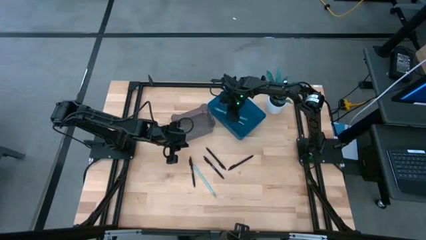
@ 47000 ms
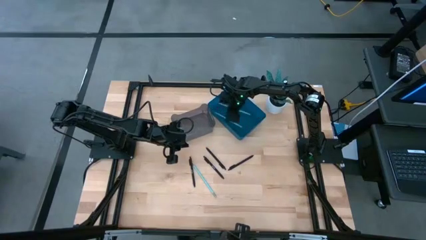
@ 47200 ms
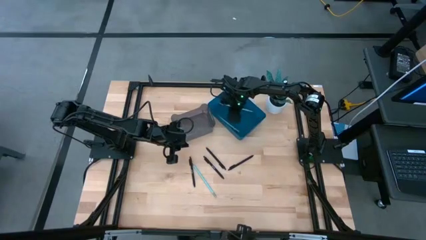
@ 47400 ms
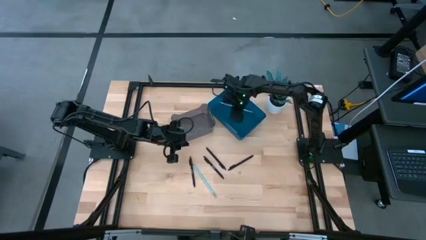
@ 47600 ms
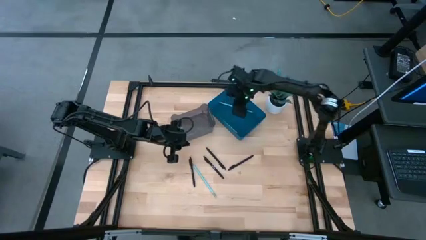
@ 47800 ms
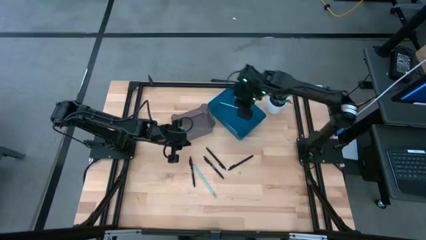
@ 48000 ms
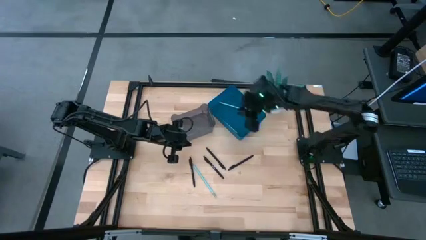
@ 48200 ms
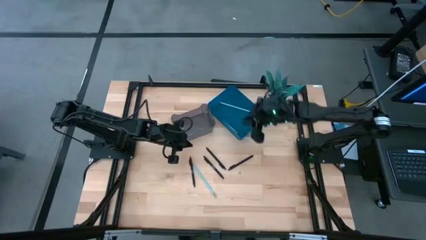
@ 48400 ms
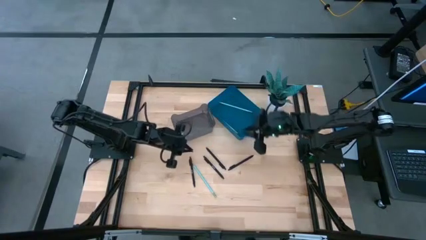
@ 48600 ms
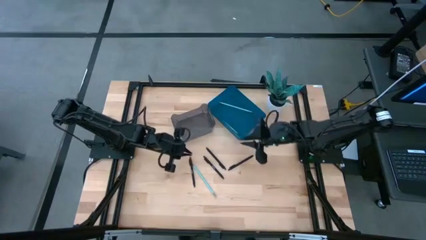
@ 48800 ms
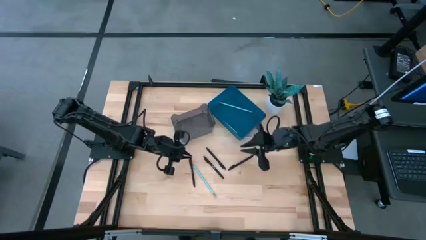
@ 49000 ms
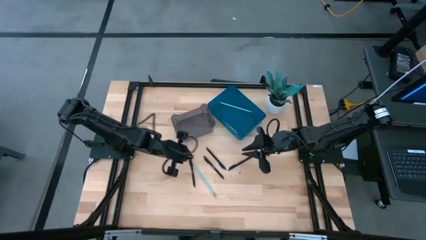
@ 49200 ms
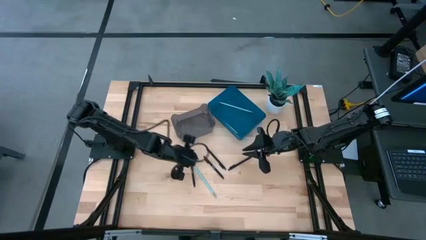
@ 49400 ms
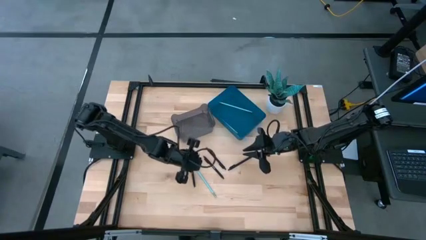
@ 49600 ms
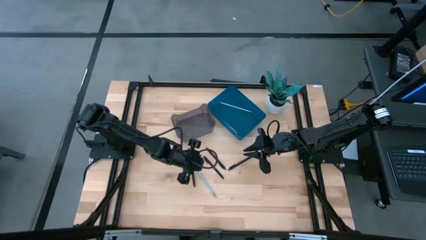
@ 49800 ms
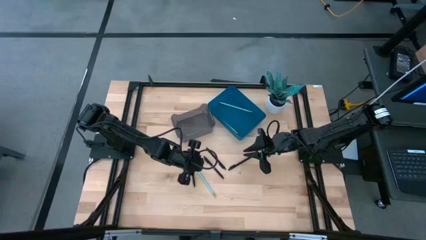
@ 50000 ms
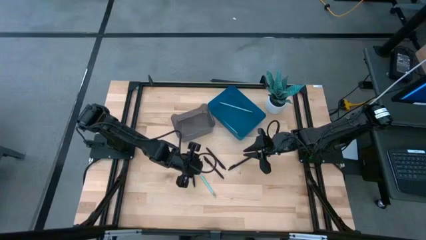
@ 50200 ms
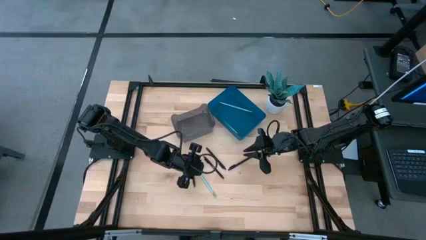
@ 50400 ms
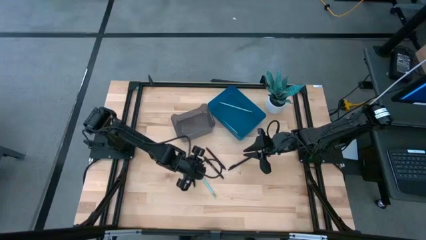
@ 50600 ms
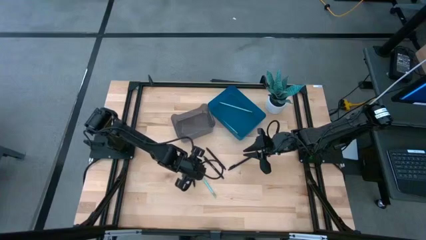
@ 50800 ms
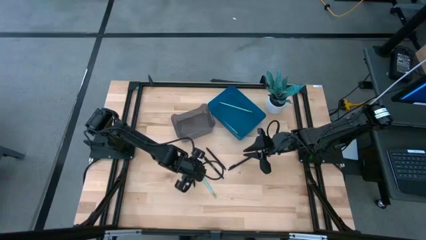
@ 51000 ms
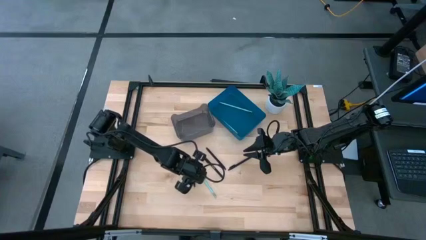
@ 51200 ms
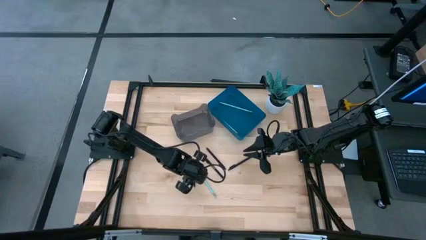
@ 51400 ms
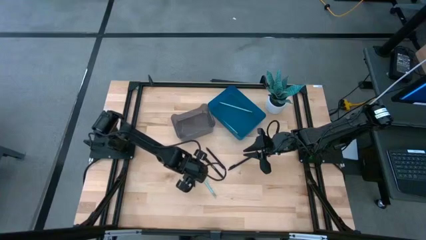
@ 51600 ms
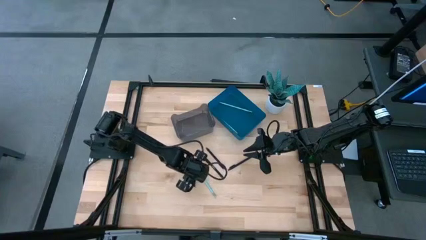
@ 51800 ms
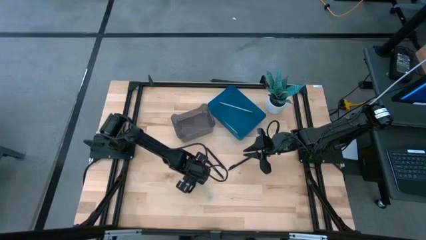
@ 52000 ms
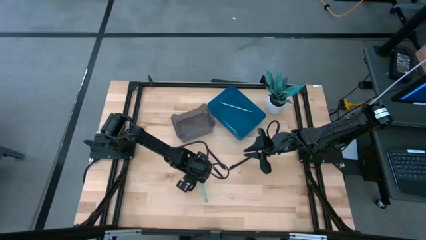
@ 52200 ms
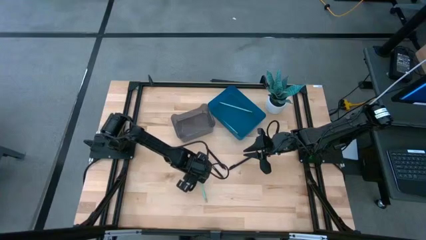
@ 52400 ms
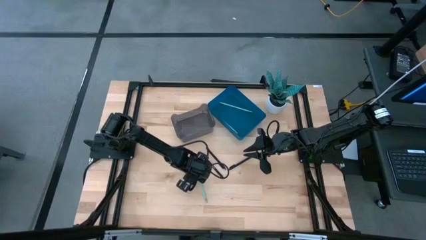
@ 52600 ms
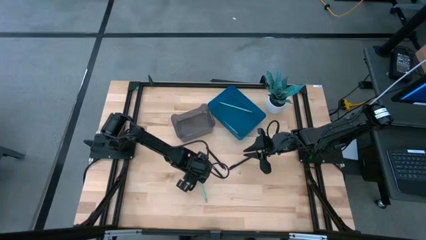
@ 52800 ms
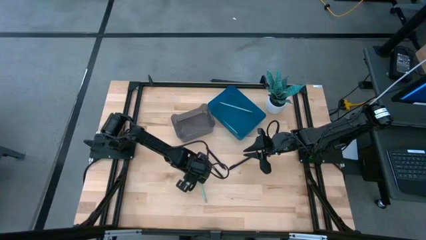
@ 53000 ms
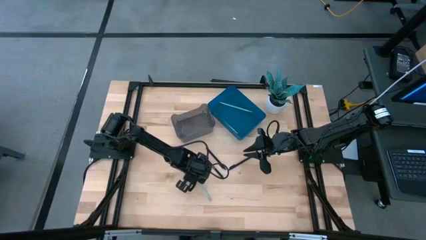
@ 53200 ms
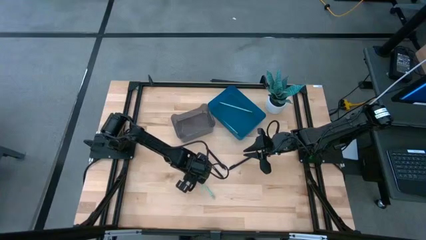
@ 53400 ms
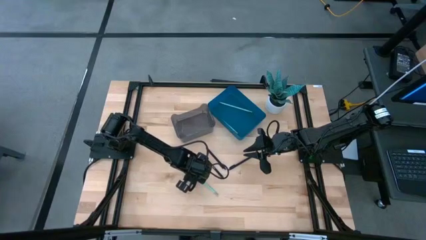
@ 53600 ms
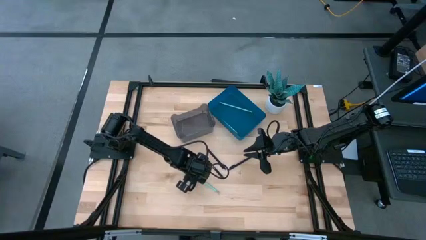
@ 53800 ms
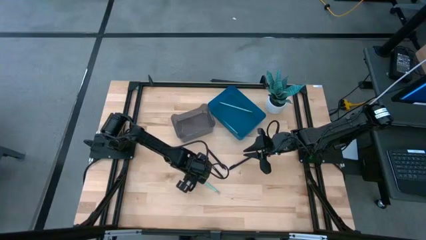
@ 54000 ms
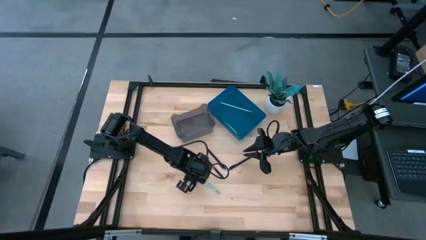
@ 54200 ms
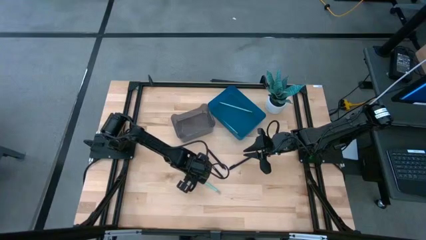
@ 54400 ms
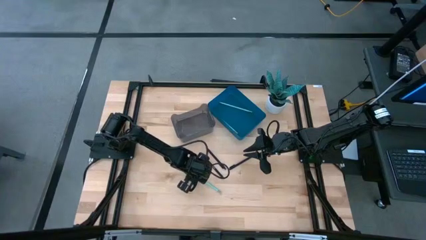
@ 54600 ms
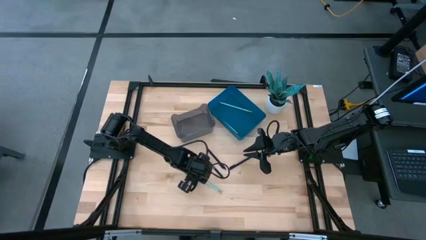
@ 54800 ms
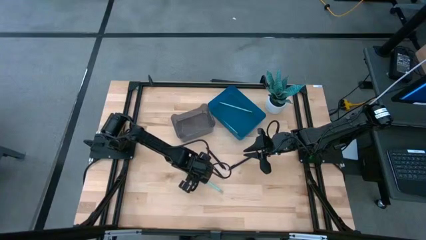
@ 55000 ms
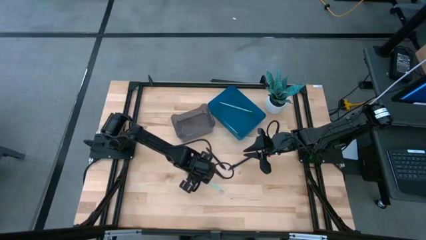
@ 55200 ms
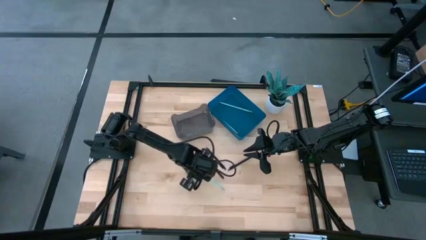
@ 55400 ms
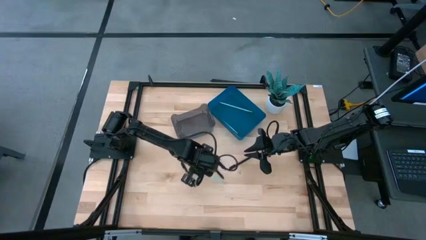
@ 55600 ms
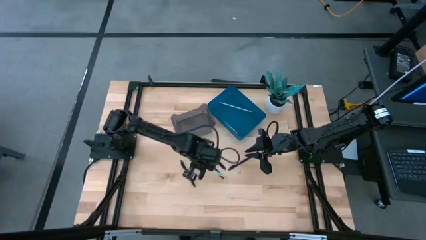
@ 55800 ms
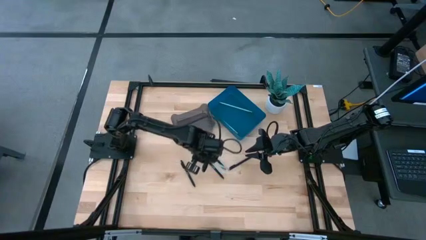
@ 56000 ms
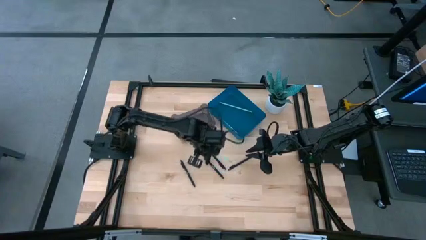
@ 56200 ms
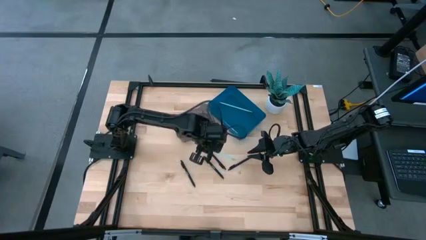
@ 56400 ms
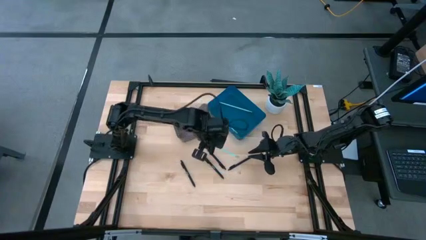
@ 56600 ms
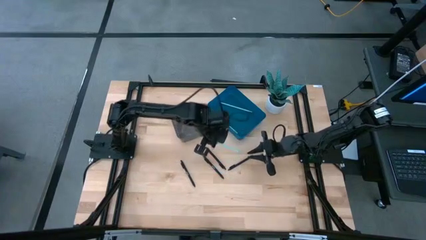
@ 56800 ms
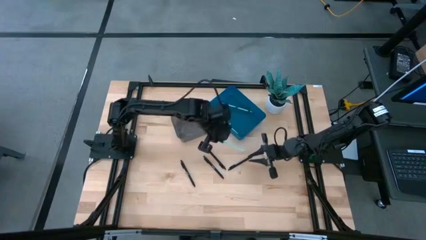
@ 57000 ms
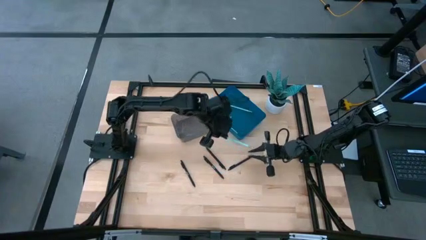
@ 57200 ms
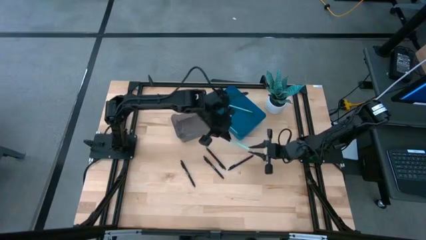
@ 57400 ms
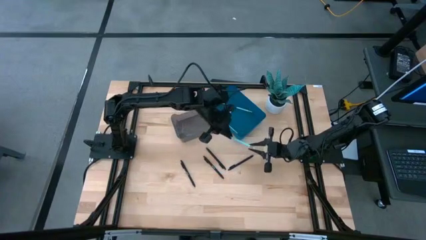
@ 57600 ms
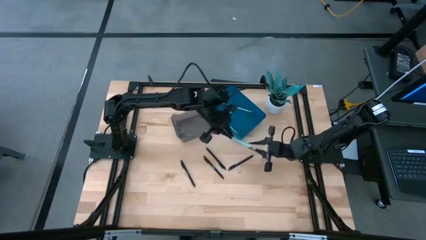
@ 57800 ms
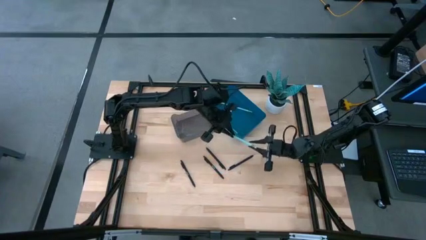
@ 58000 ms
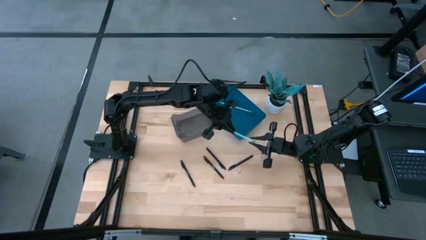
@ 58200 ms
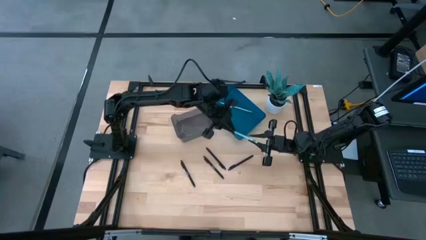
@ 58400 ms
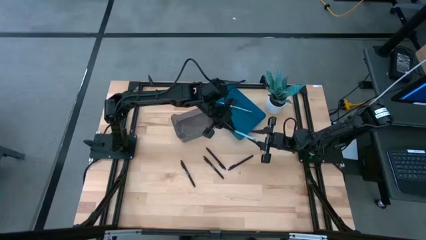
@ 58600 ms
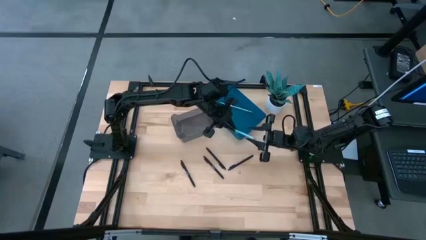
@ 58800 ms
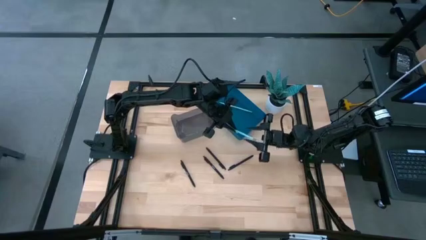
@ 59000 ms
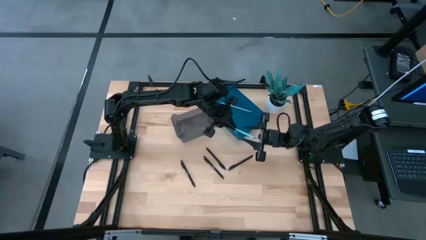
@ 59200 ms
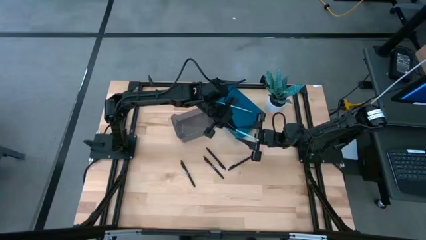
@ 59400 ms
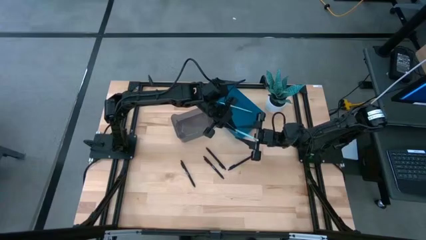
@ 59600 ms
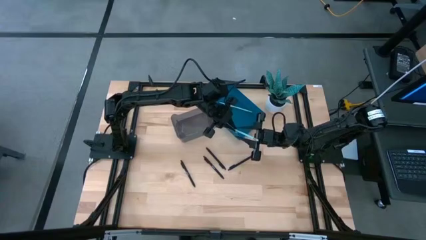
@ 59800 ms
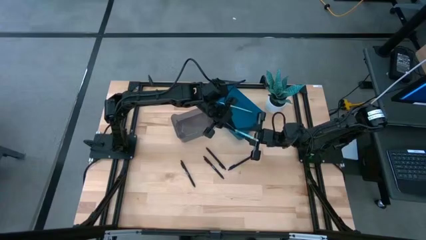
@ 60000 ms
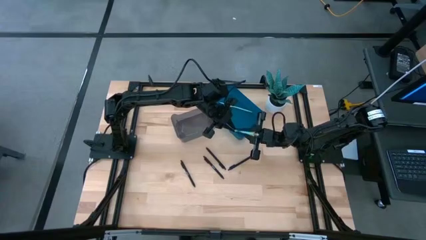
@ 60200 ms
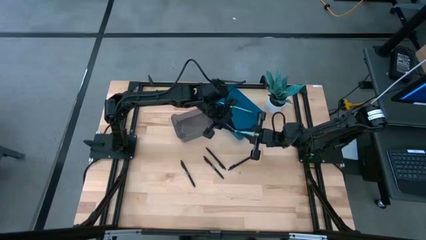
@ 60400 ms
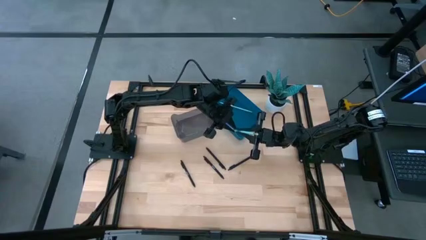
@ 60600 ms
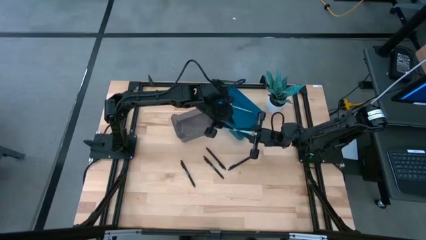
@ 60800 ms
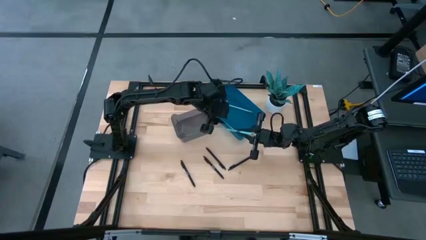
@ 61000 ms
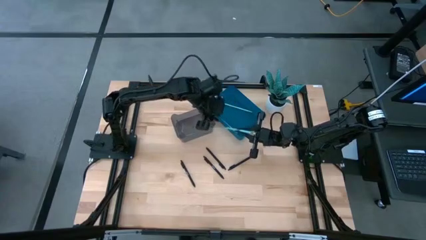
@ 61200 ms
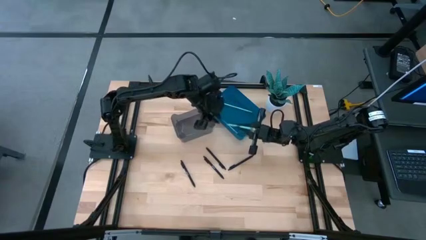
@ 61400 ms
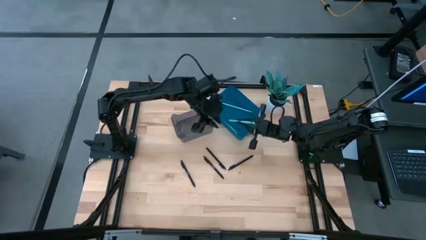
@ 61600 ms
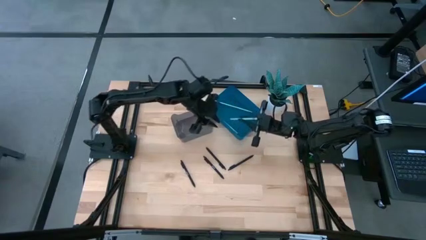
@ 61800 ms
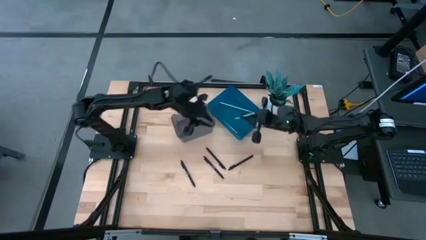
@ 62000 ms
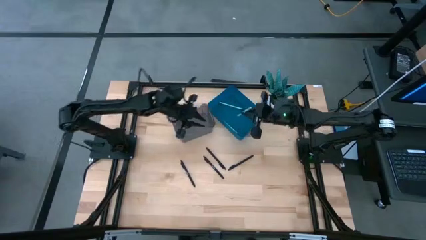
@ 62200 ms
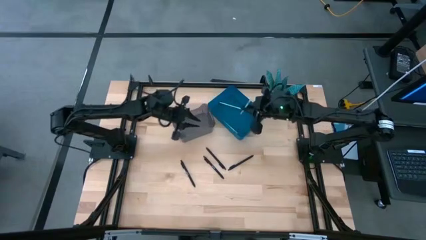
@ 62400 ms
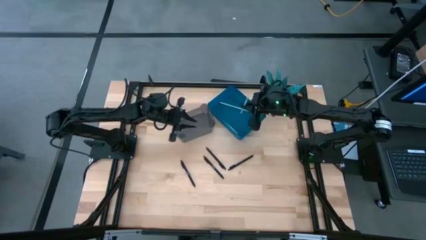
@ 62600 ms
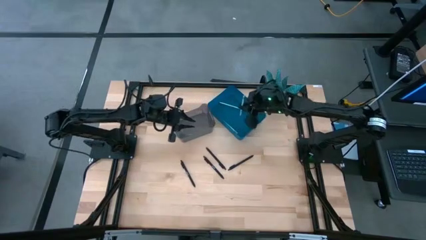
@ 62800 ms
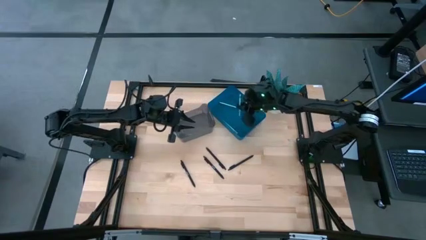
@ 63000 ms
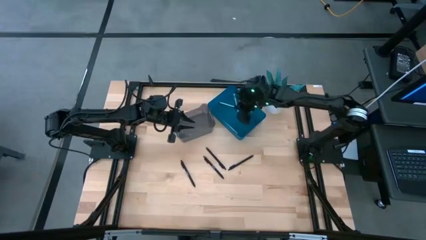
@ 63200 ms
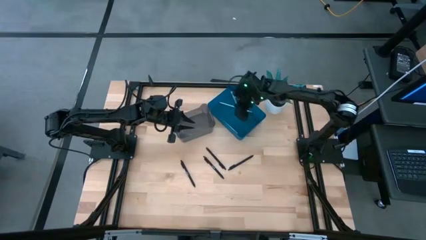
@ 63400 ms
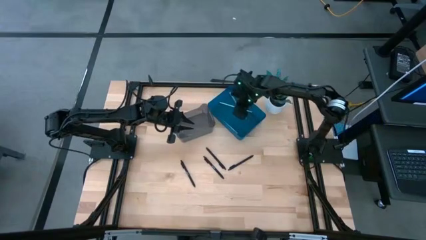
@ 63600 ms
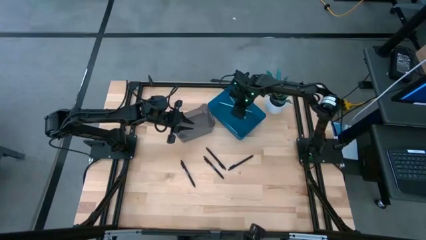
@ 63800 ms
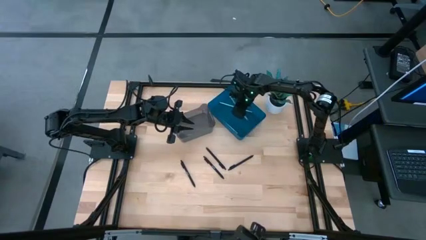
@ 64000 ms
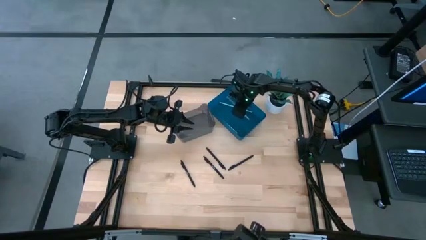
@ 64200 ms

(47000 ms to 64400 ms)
Task: Sort pens & pencils
Put the light blue pencil into the blue bin
